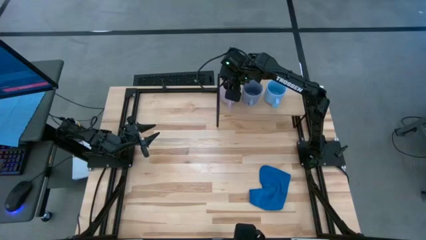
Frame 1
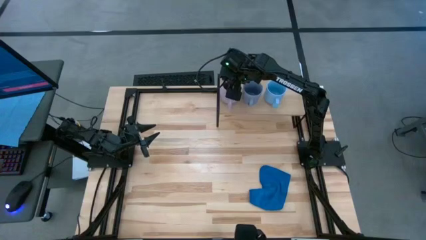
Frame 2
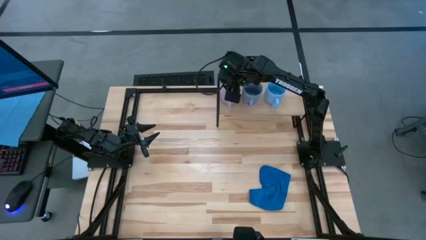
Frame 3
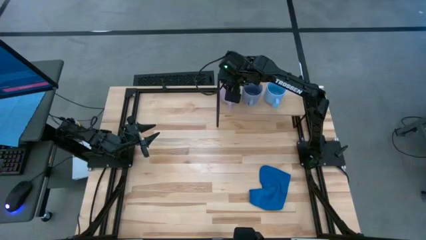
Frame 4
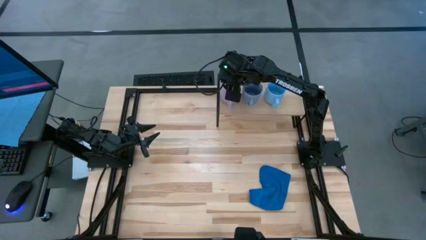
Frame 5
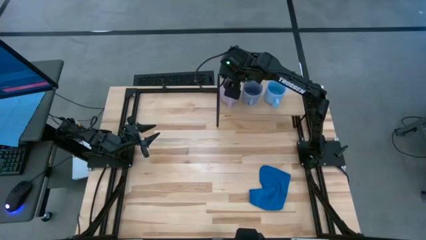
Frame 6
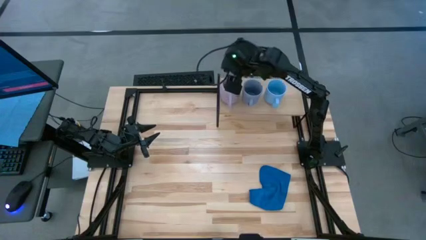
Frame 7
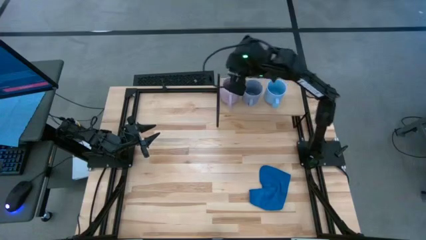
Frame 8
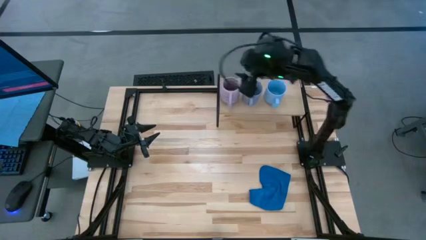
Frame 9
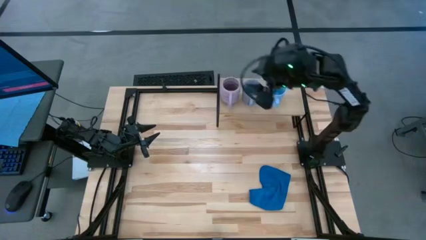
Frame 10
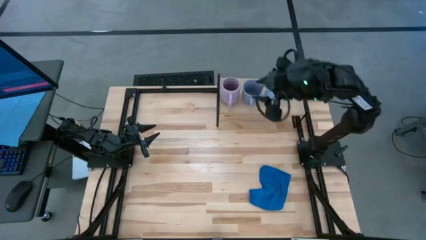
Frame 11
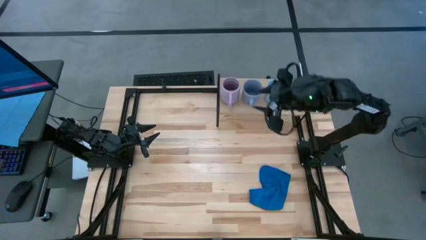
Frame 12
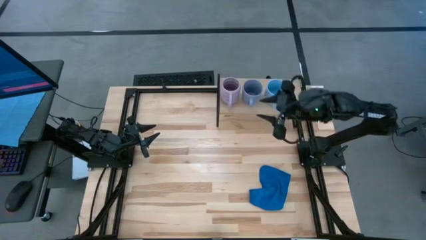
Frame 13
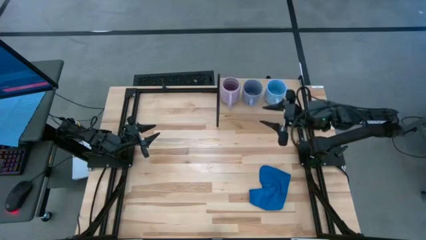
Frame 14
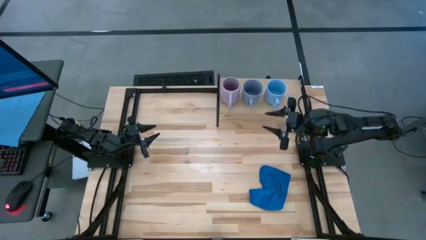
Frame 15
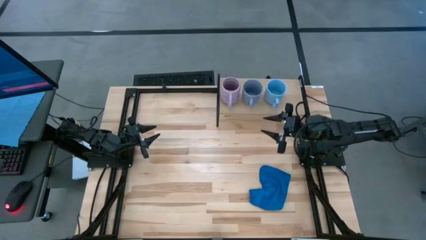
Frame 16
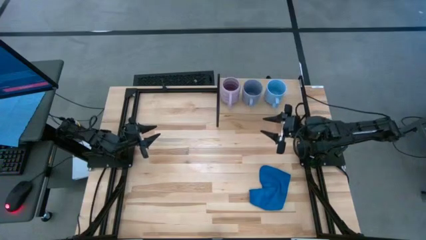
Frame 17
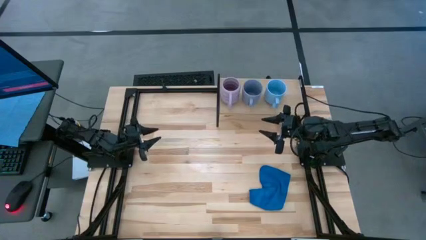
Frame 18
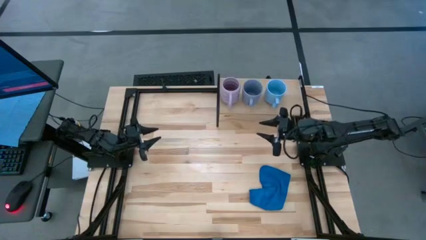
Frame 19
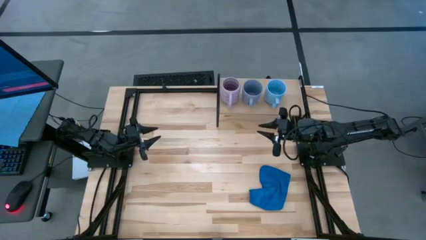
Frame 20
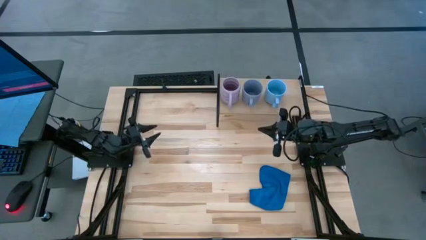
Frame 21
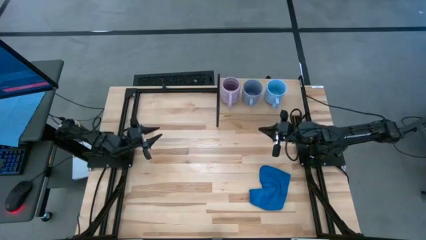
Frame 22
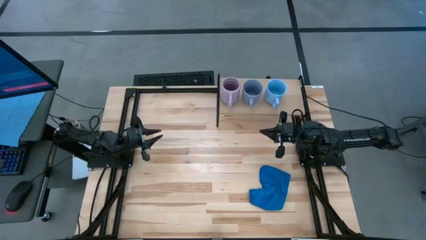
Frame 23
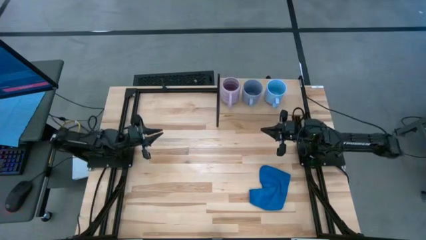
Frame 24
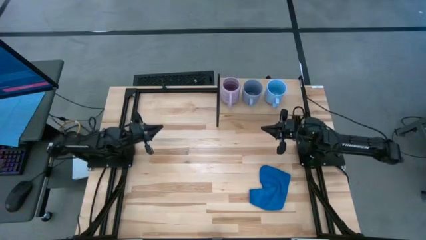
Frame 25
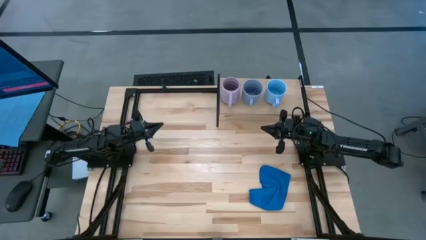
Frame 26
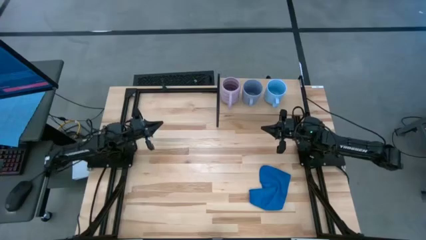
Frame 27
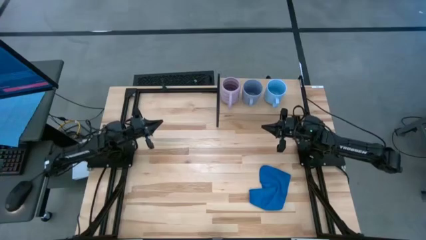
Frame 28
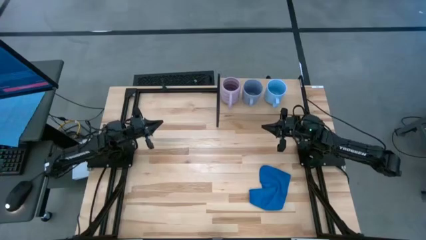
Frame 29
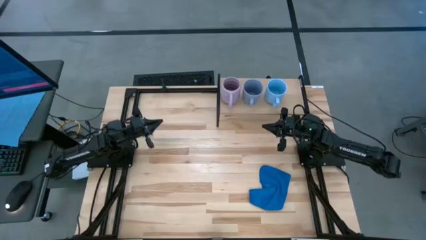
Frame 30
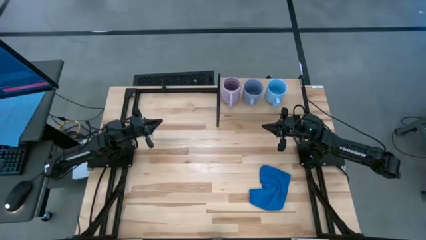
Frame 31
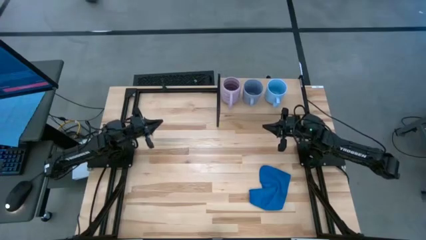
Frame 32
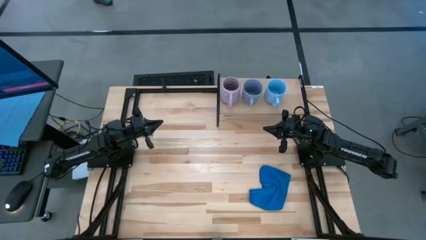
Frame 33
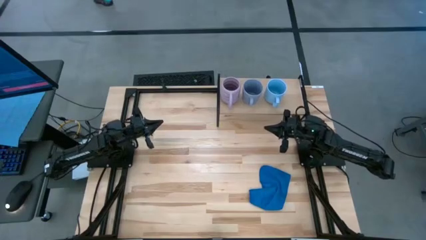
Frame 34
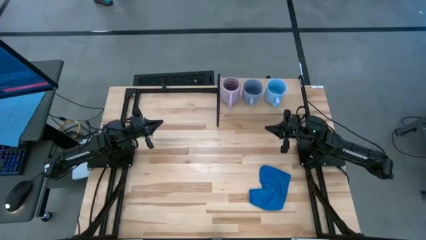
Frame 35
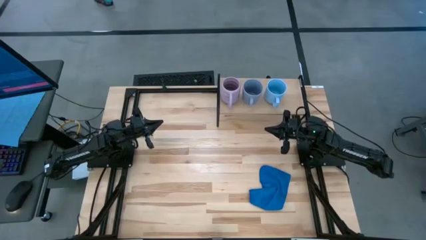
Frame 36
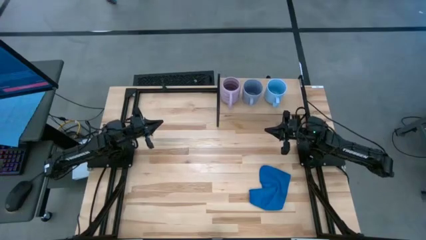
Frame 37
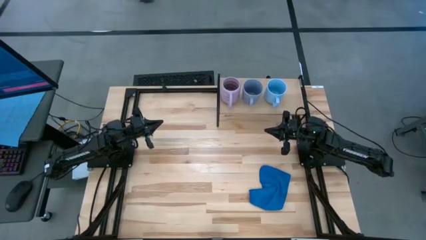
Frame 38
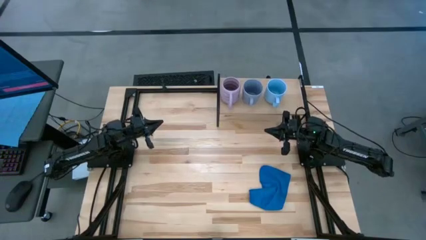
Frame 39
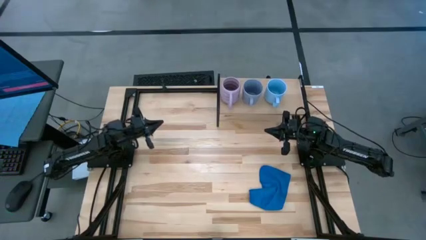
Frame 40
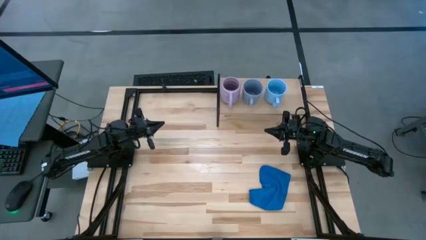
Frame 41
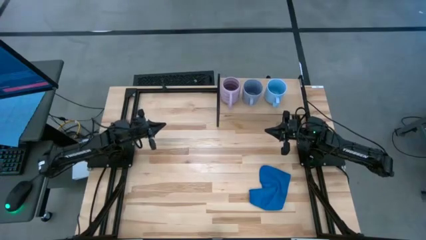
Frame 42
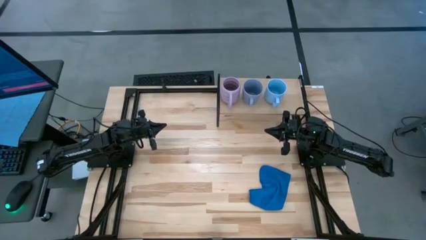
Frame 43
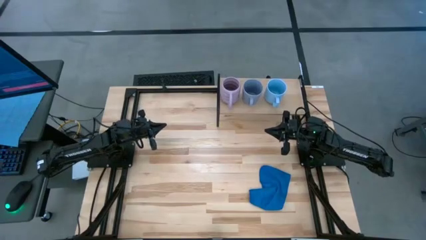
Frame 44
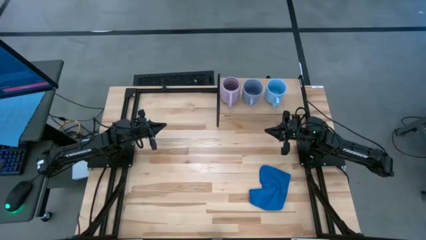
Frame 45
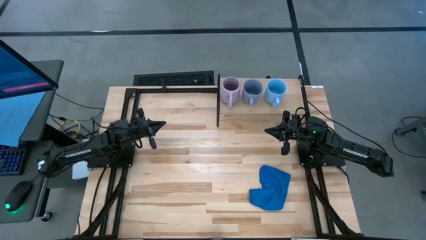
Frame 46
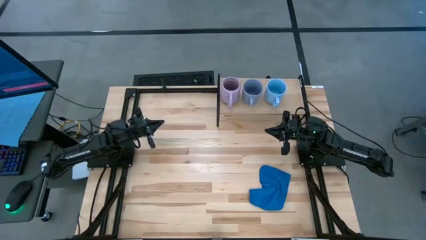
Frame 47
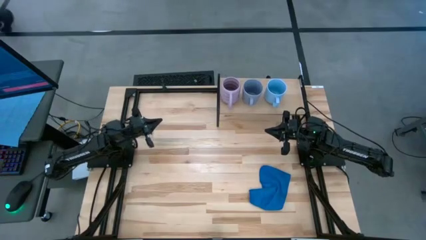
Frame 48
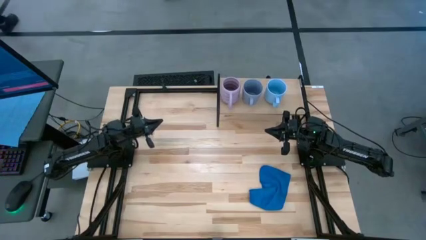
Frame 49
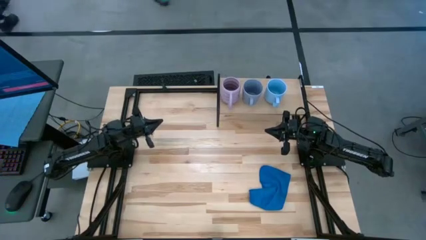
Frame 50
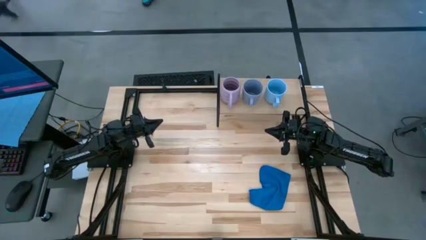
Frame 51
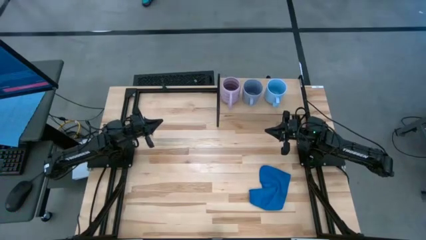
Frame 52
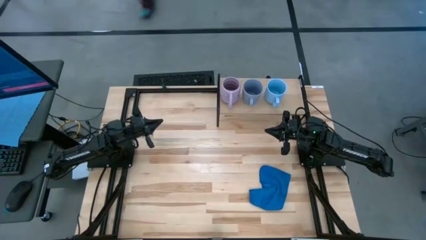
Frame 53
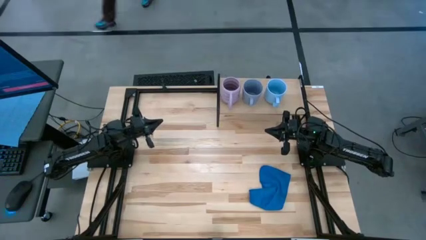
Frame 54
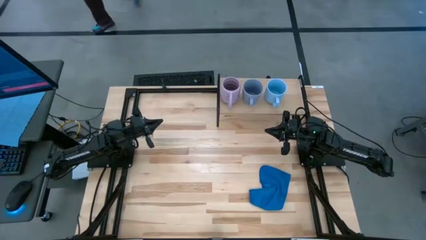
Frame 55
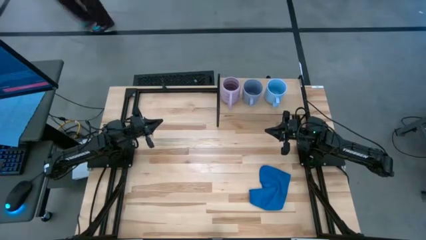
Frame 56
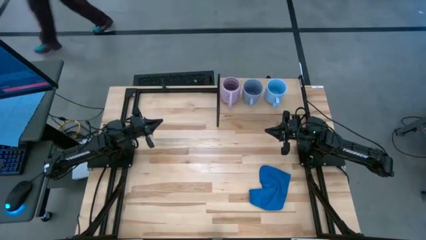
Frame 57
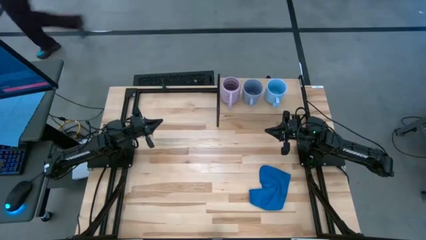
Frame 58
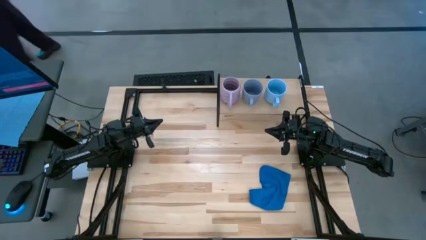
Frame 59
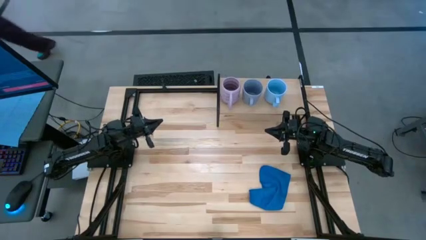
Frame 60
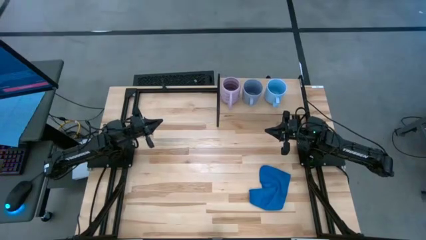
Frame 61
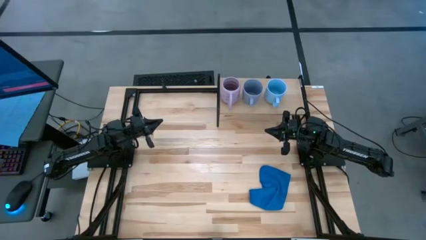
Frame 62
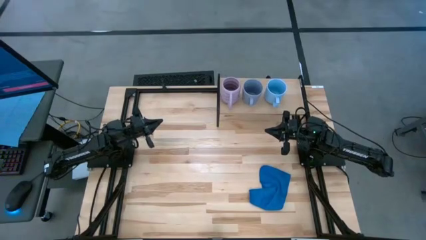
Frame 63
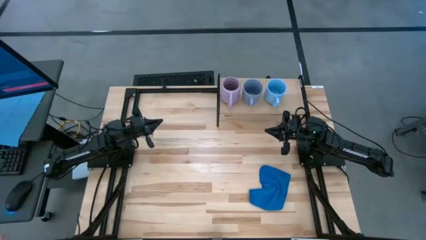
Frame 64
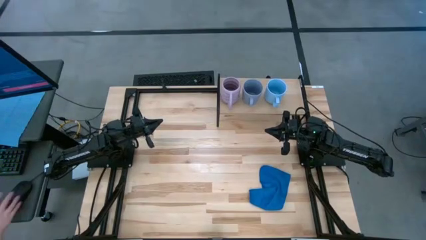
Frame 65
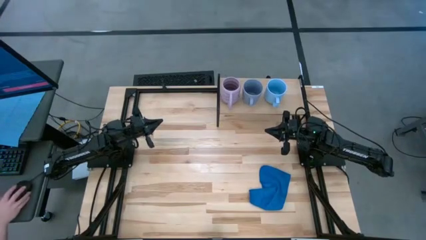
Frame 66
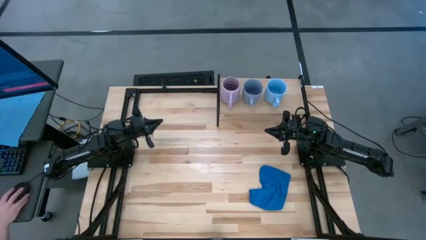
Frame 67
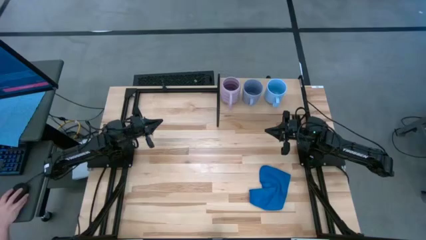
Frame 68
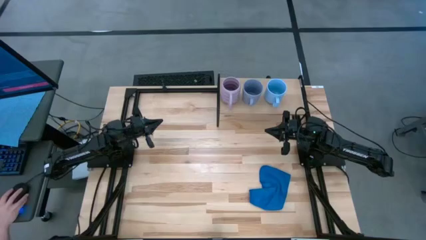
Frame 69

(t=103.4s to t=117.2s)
Task: Stack small to large cups/mugs on shelf
Return to Home Position

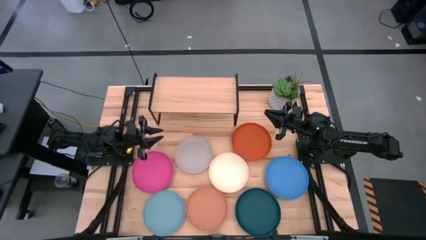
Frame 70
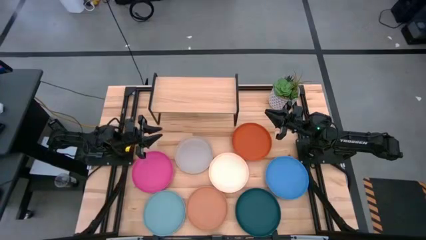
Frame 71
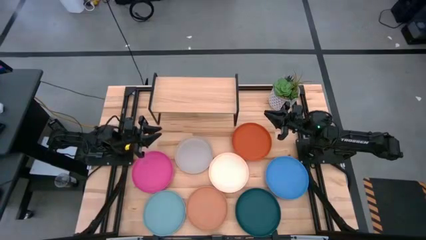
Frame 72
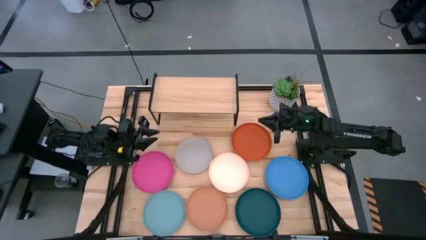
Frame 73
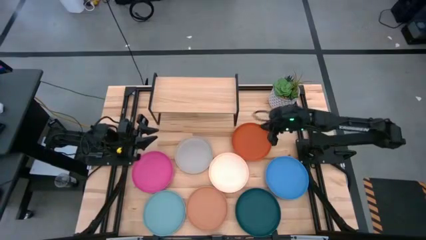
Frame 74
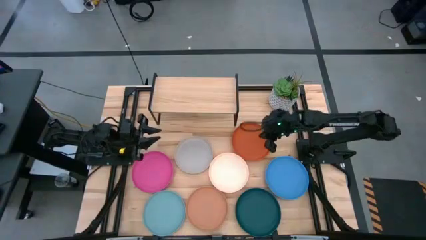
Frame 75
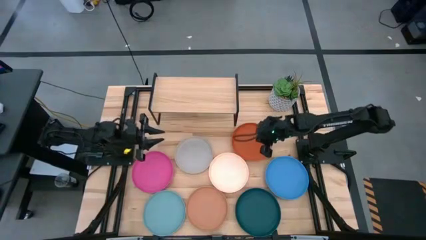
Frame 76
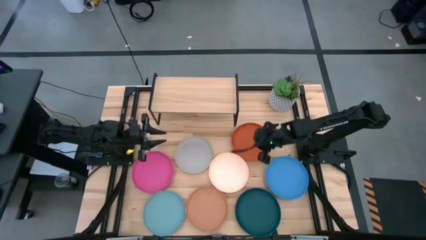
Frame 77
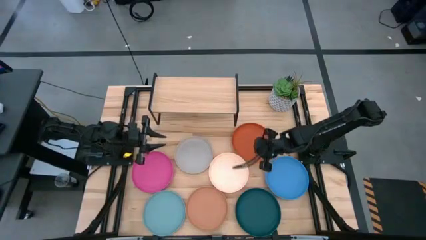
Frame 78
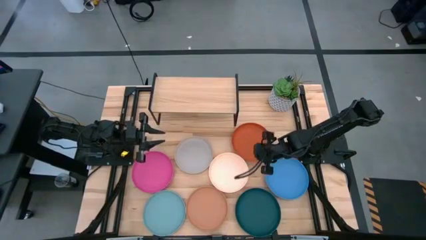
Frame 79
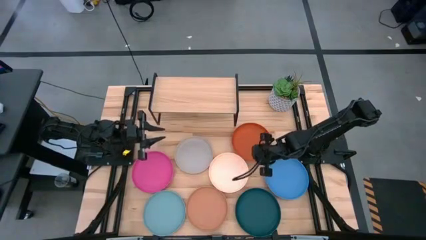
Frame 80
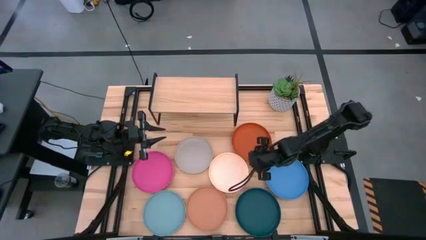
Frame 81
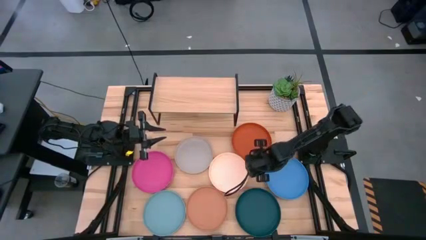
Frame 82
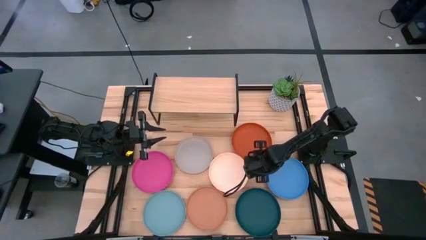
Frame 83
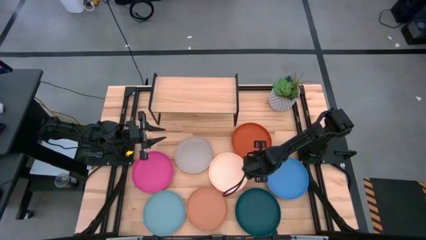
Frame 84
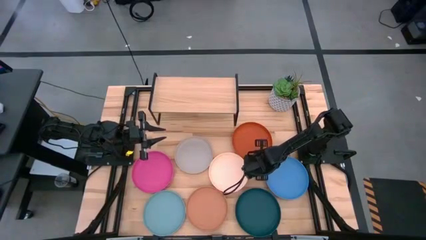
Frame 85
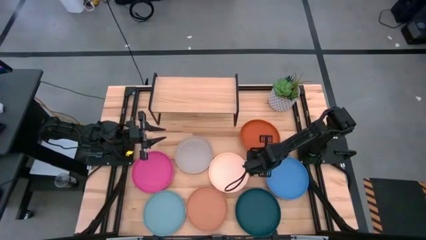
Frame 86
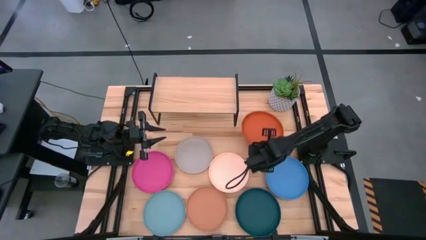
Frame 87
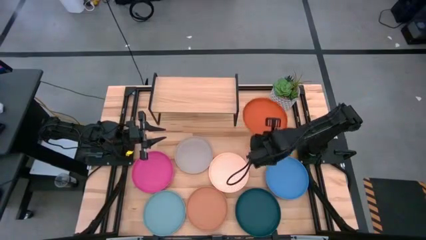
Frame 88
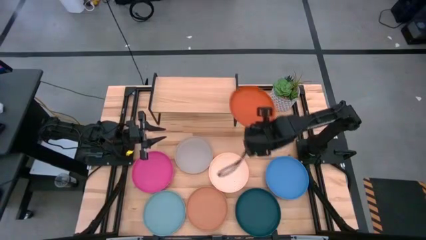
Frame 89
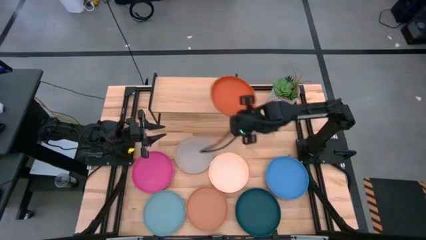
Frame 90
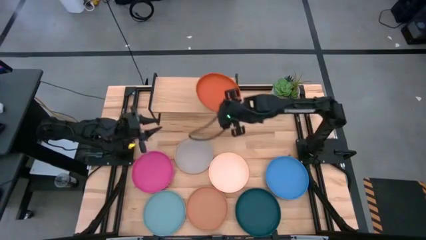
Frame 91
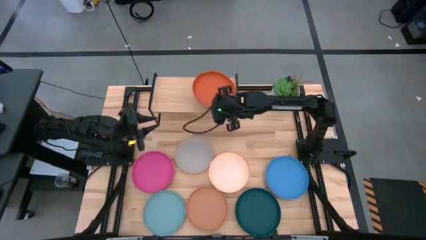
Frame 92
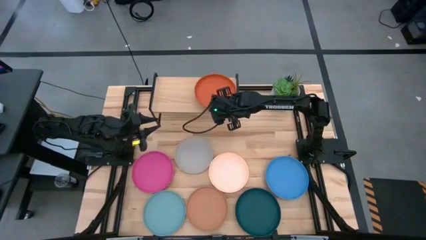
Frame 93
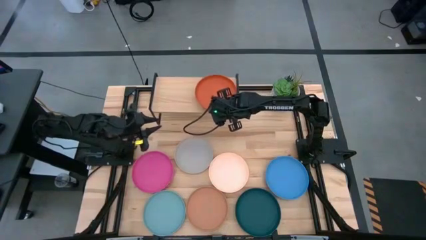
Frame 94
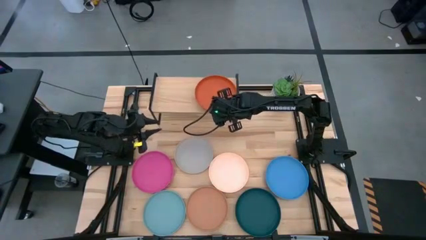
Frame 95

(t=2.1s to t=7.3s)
Task: Place and stack plates onto a shelf
Put the orange plate on the shelf
